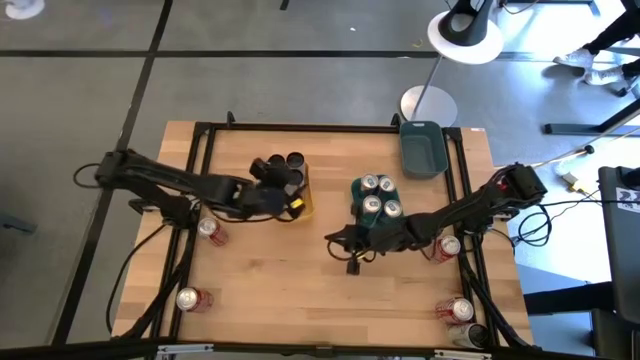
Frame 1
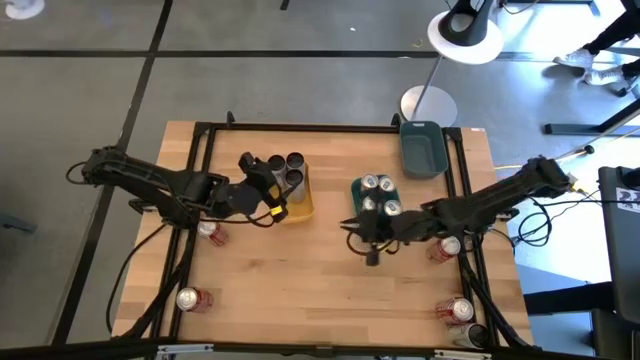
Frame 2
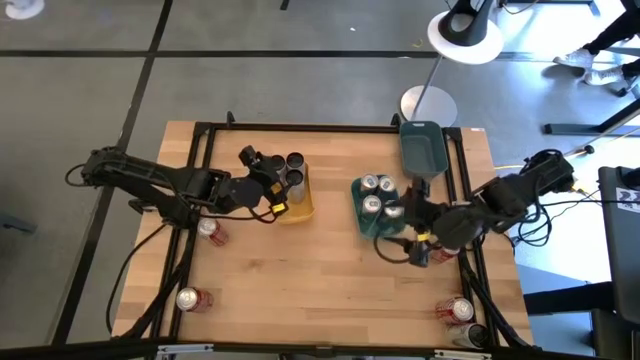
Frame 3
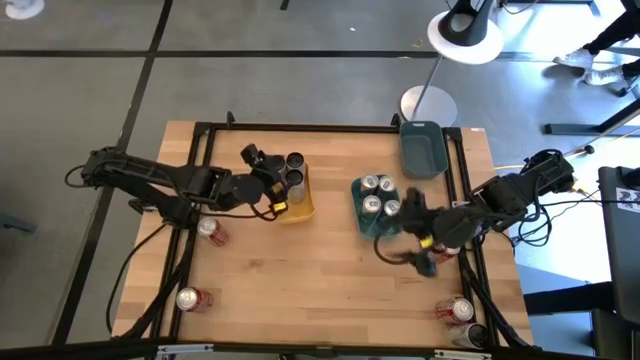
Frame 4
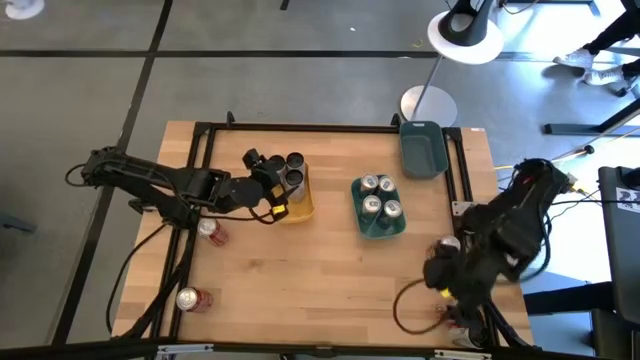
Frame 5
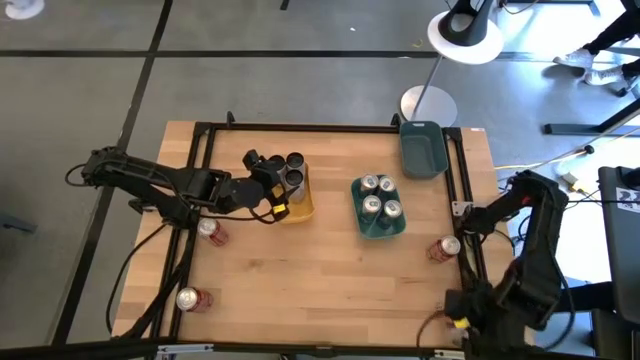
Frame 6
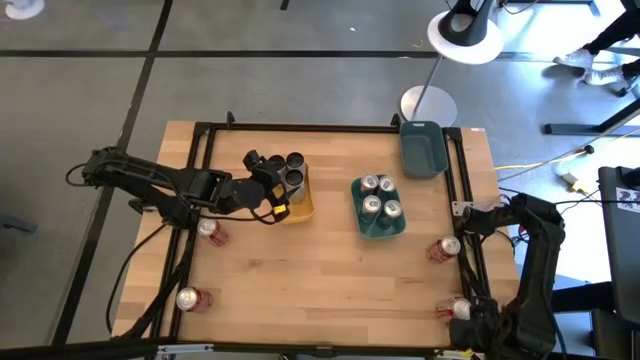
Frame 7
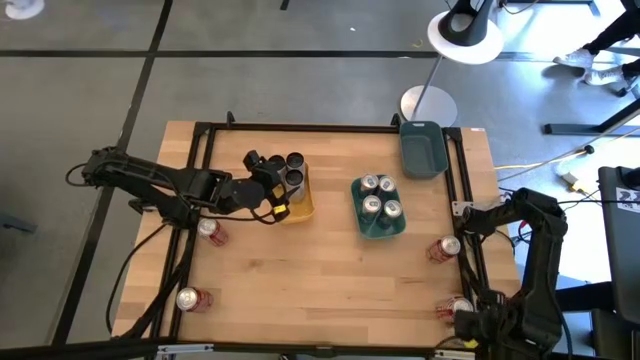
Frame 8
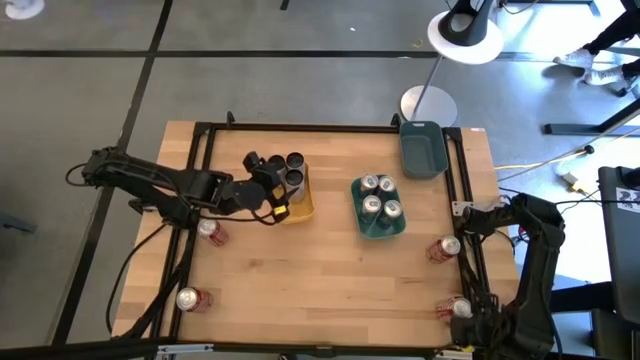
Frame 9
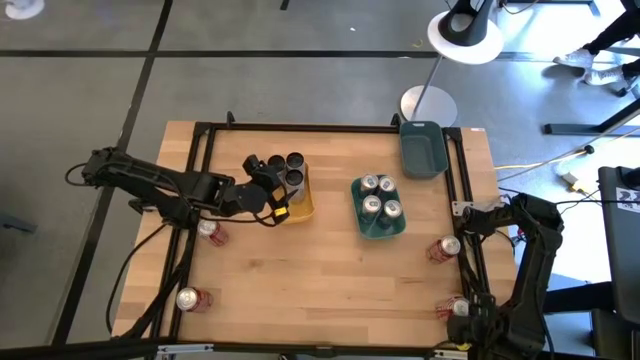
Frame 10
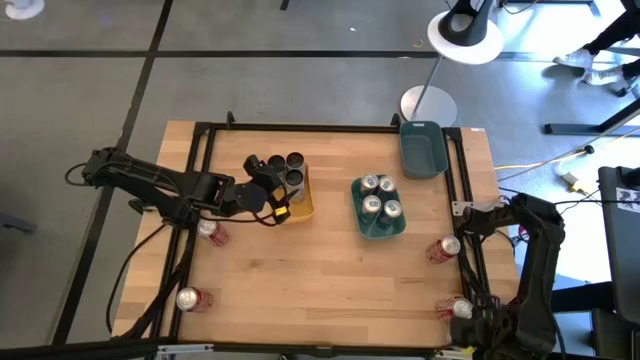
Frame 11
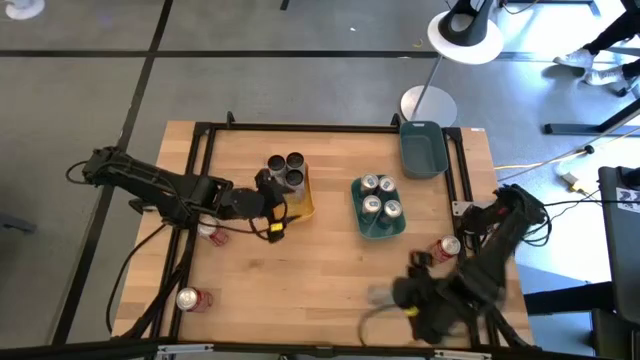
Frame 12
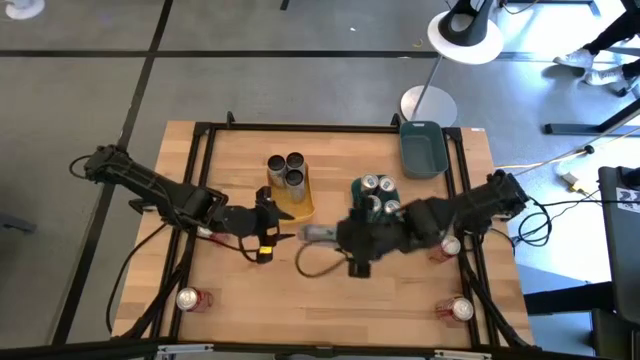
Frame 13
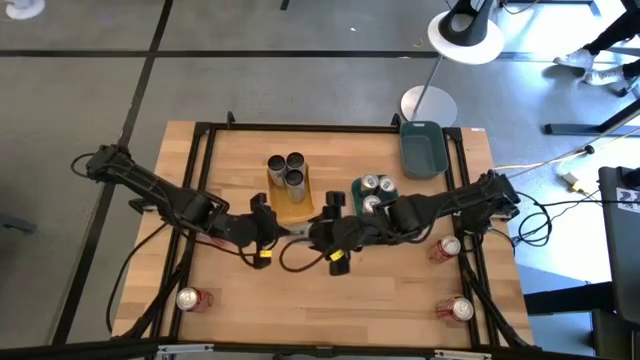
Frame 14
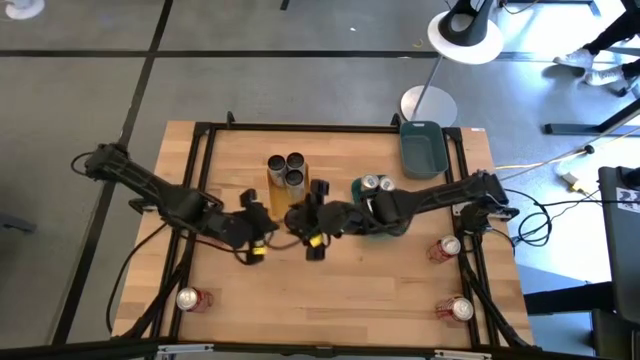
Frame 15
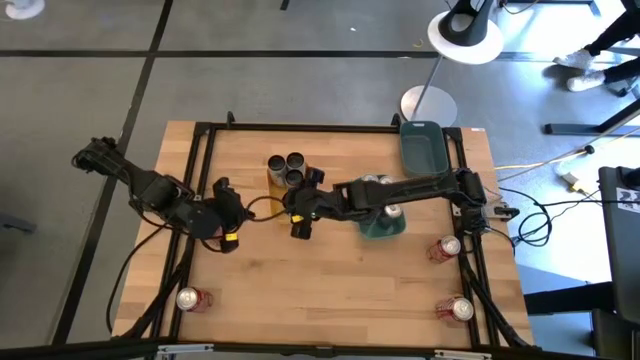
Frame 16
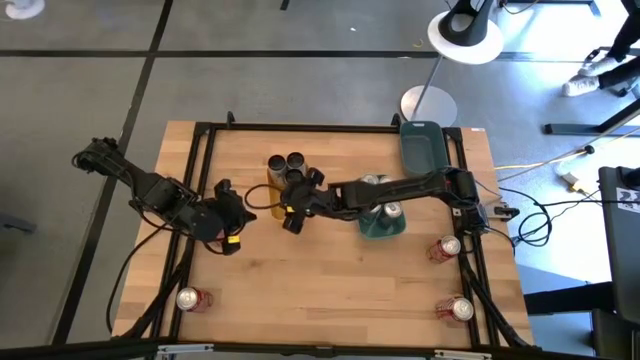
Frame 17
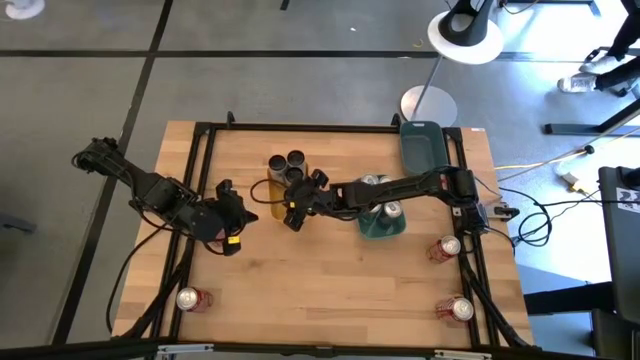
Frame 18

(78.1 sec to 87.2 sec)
Task: Sort soda cans
Put the white-pink soda can into the yellow bin

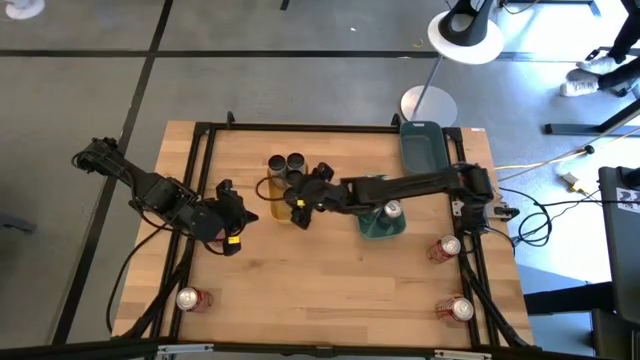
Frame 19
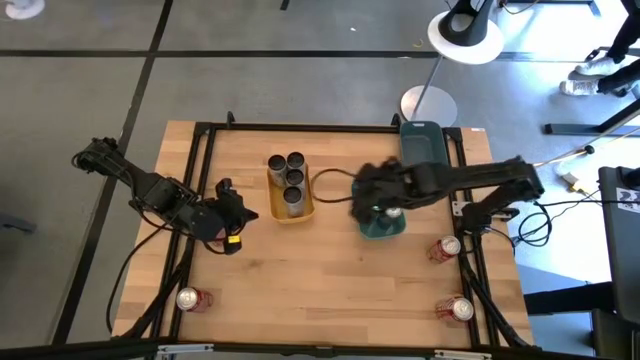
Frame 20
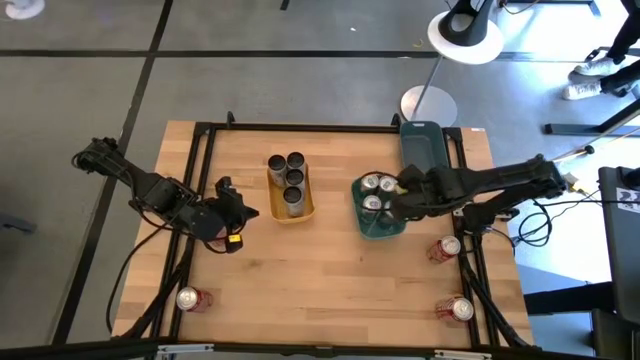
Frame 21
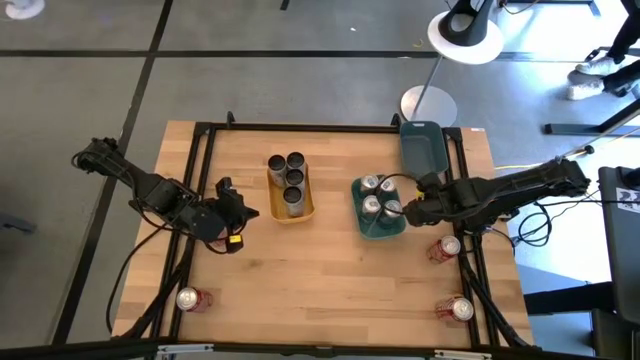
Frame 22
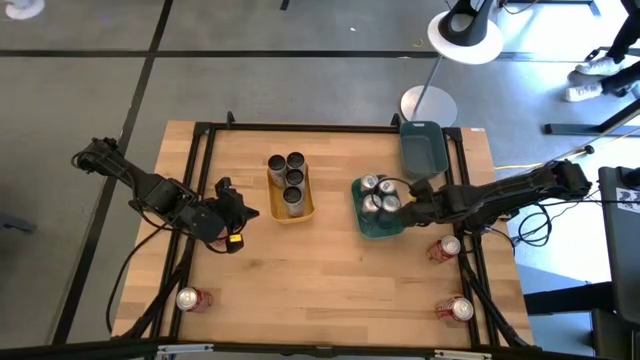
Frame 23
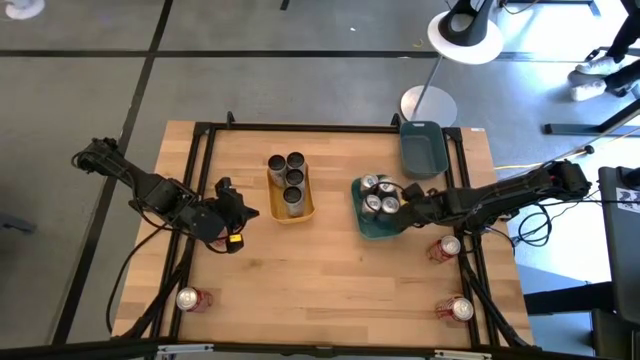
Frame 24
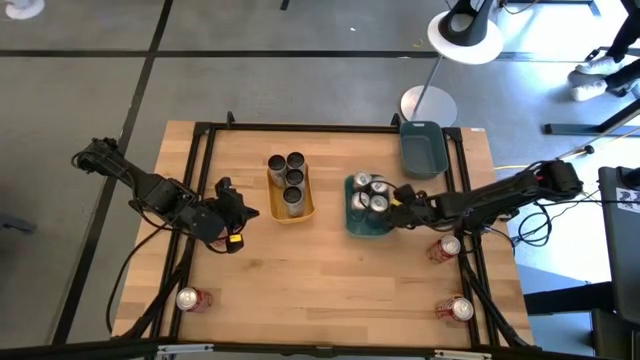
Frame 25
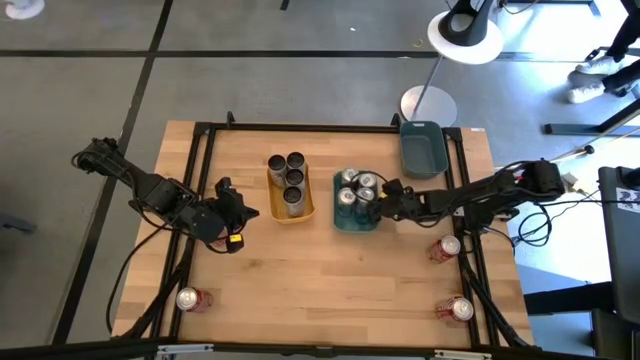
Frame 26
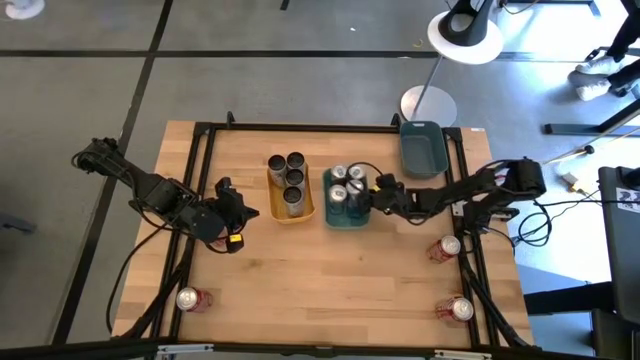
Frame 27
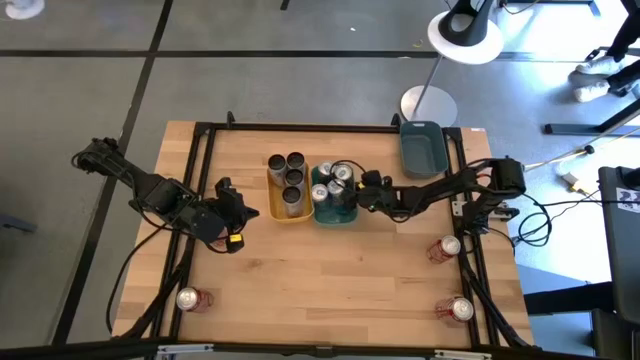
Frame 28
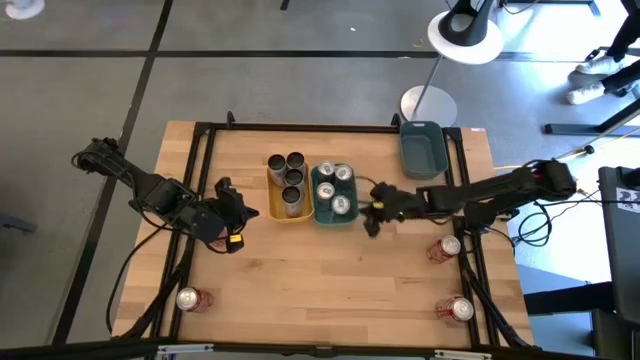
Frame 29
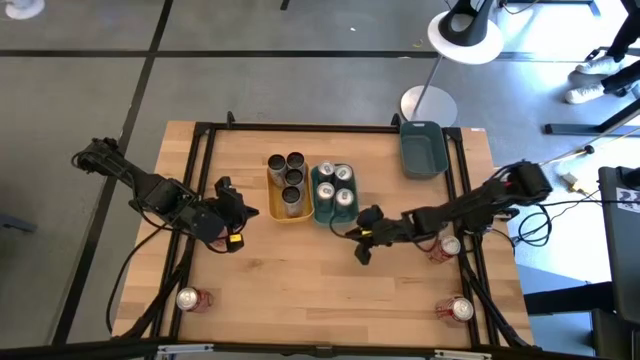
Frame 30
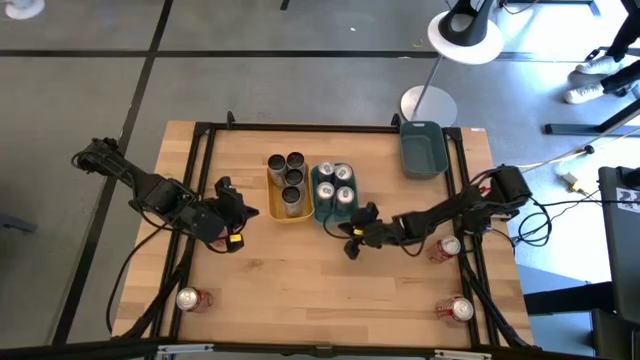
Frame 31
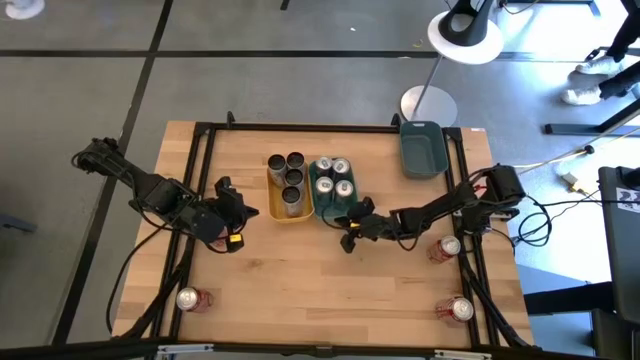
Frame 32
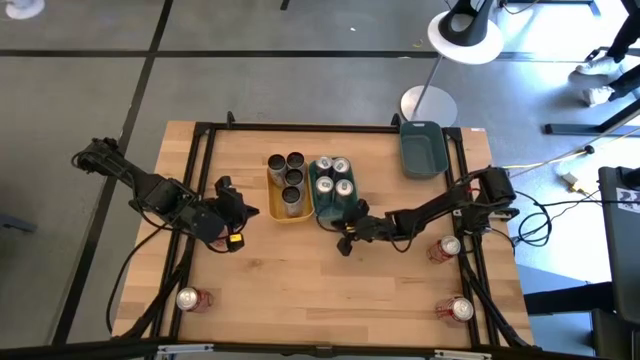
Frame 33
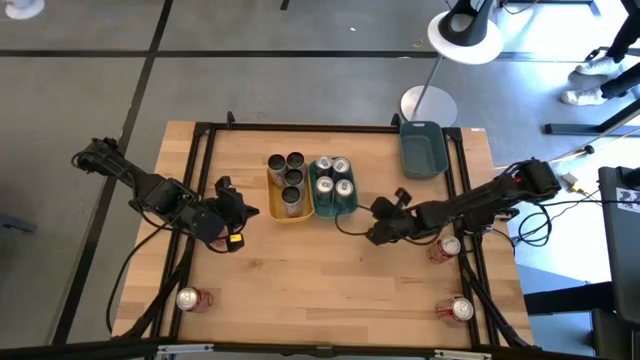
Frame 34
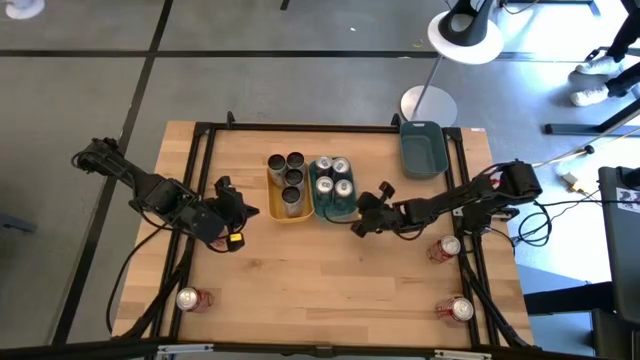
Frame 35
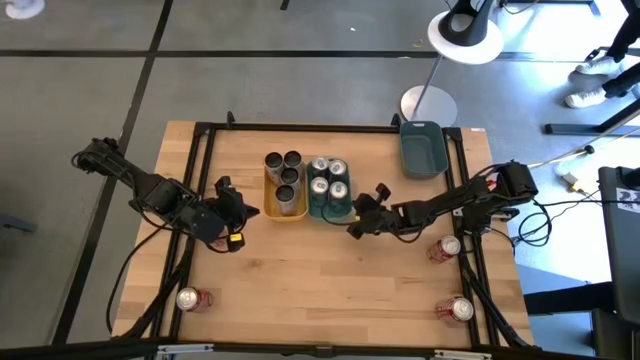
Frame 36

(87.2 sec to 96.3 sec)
Adjust the green bin

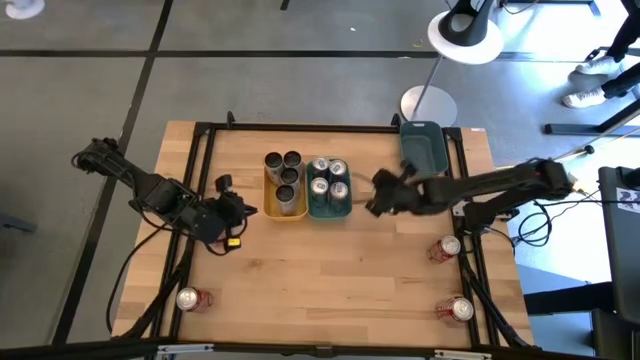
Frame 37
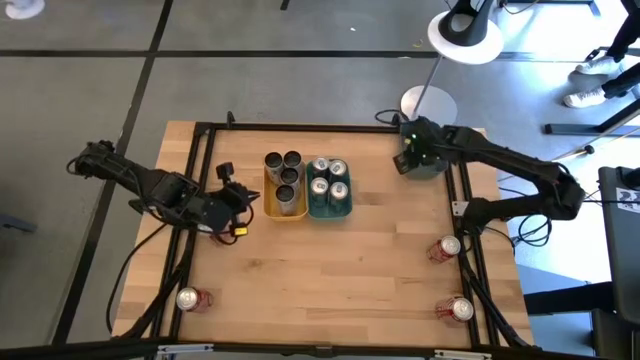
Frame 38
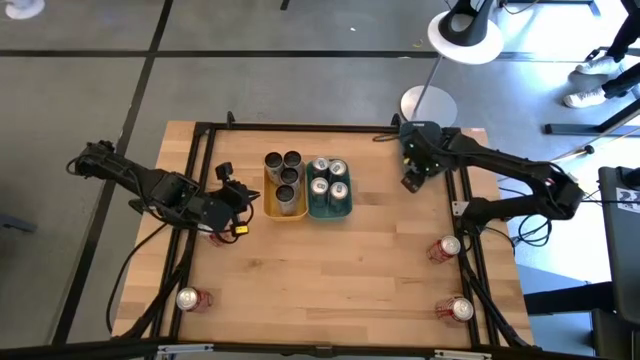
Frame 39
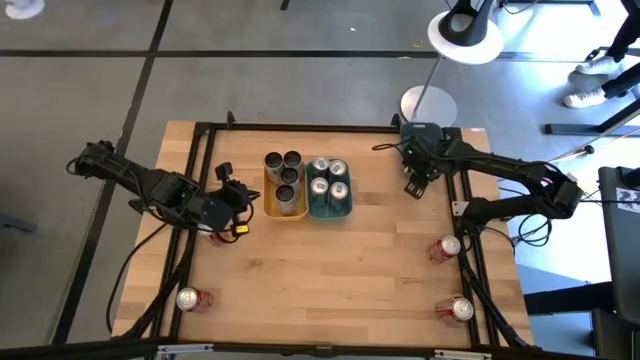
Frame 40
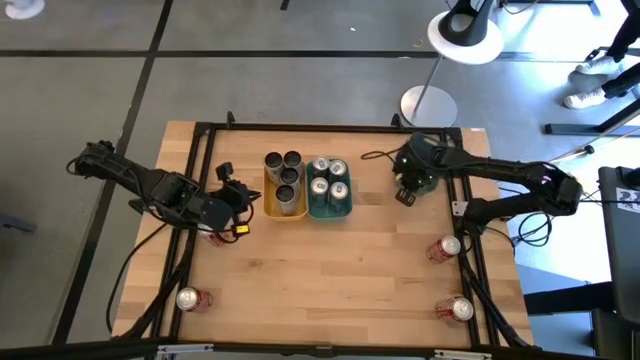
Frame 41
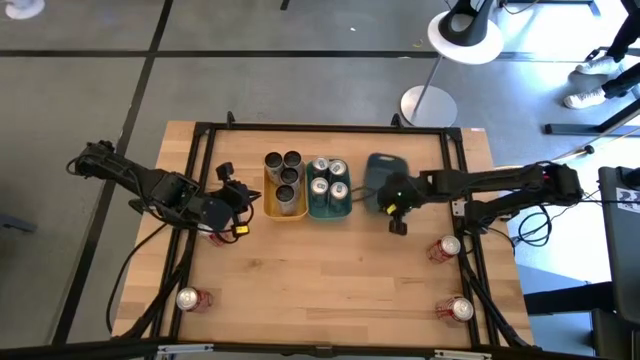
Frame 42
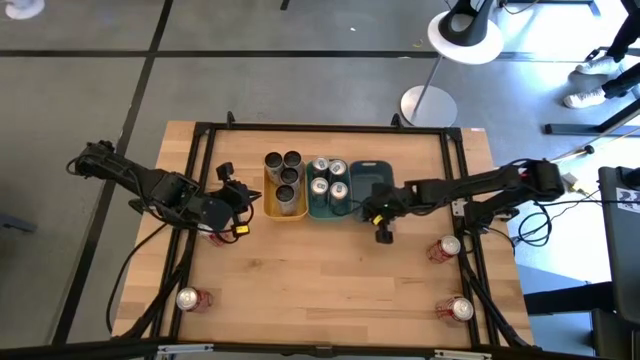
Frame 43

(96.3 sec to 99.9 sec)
Adjust the blue bin
